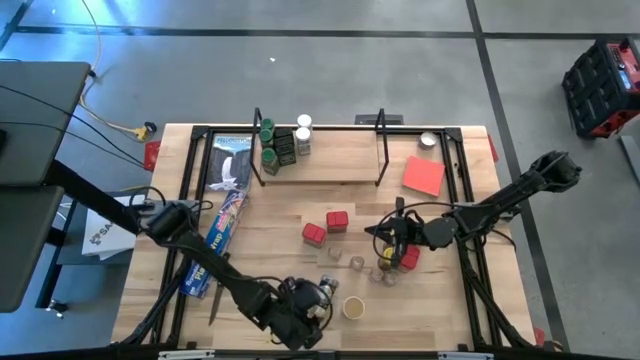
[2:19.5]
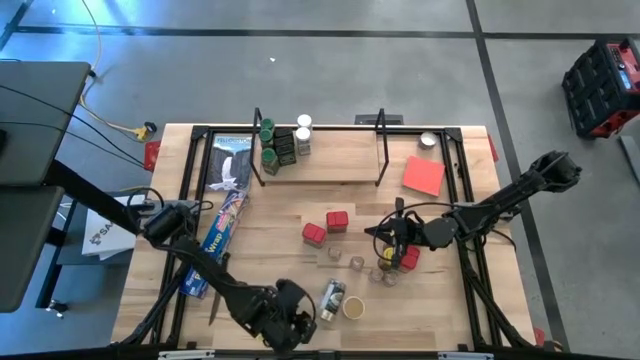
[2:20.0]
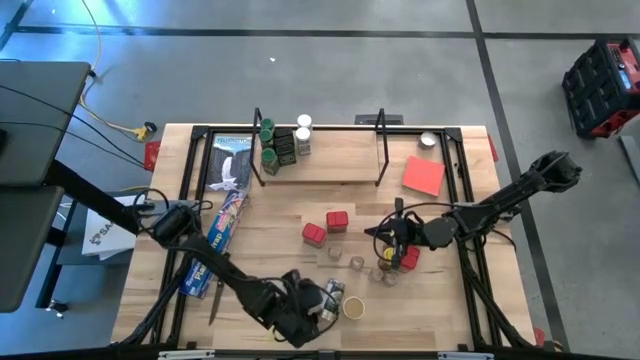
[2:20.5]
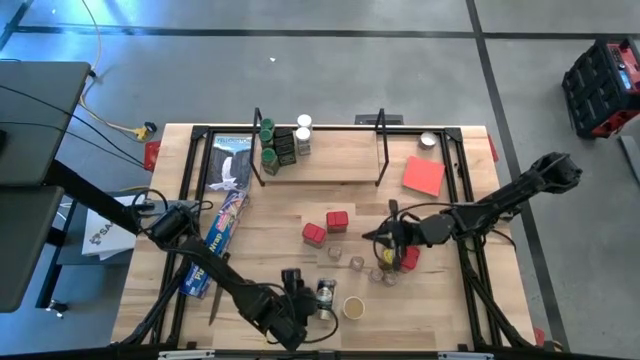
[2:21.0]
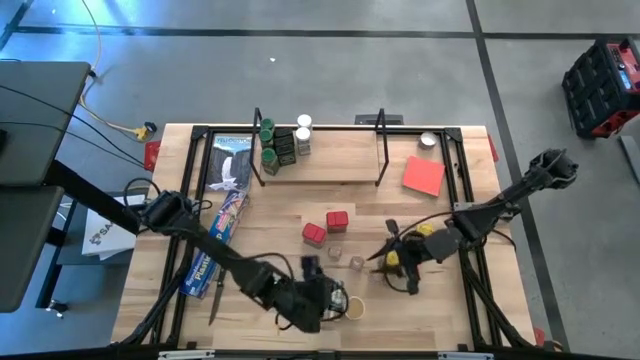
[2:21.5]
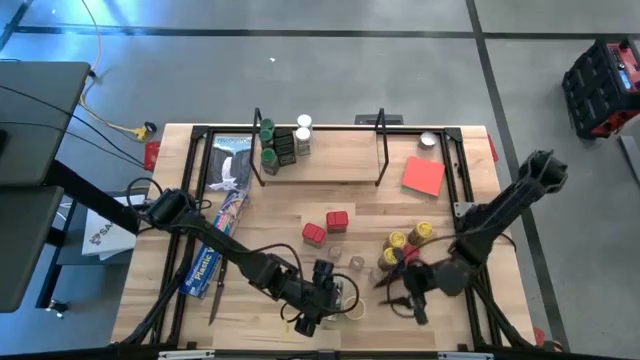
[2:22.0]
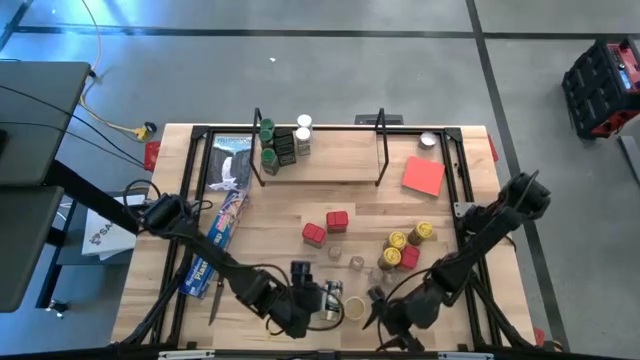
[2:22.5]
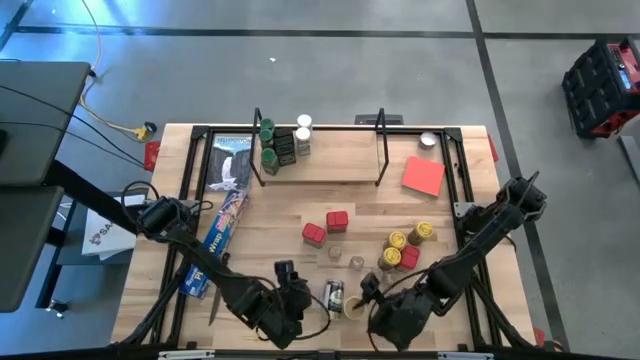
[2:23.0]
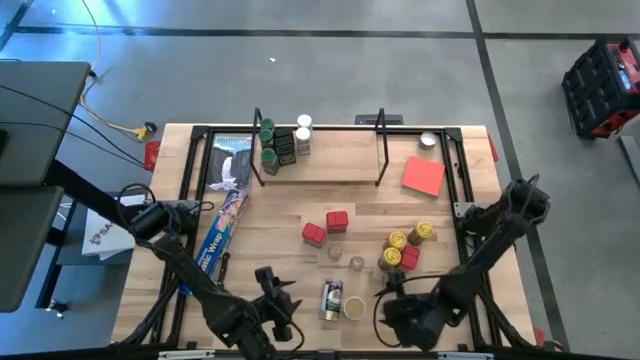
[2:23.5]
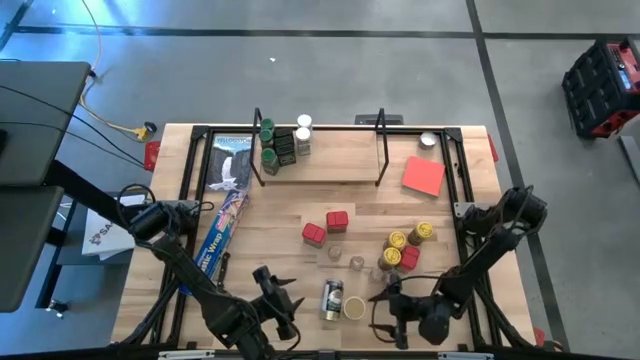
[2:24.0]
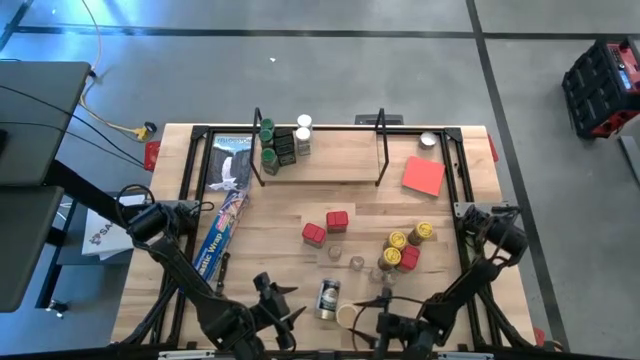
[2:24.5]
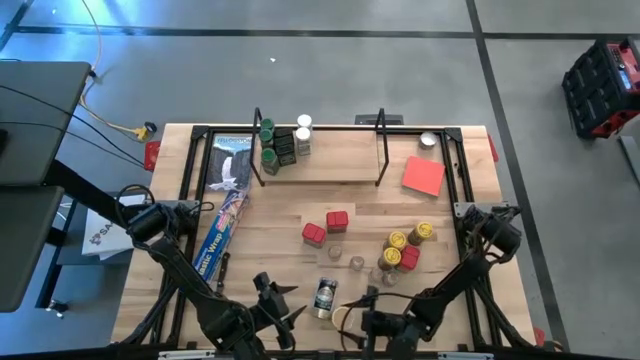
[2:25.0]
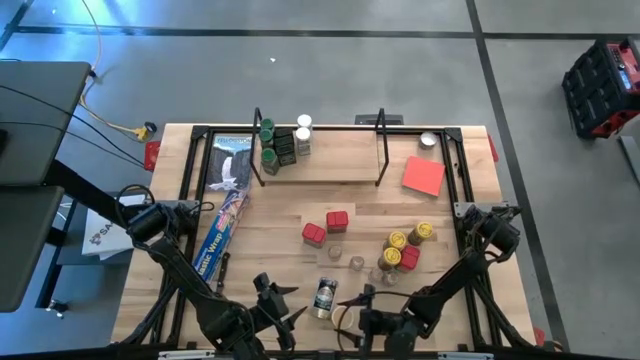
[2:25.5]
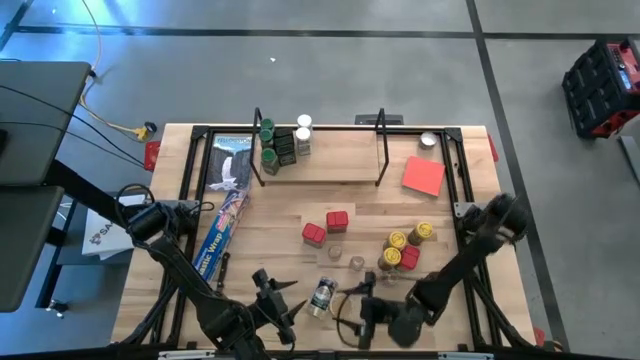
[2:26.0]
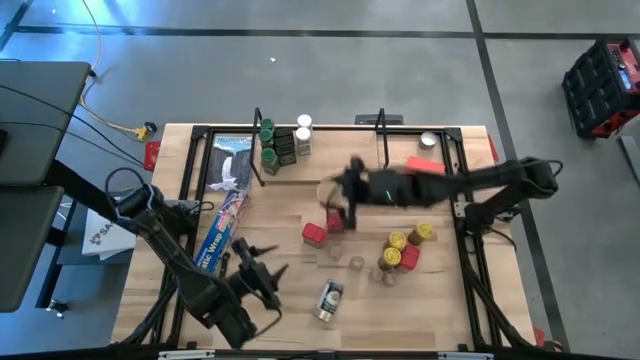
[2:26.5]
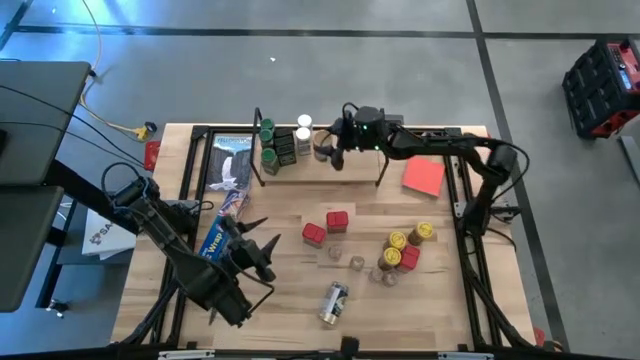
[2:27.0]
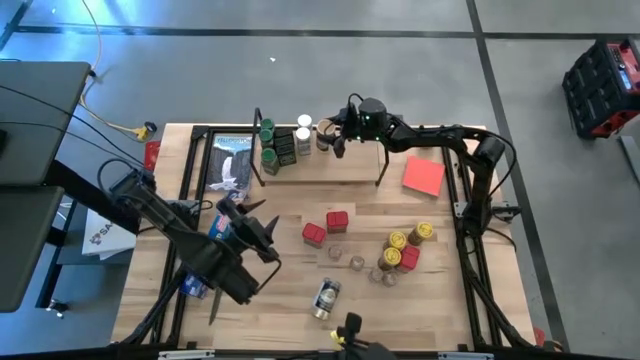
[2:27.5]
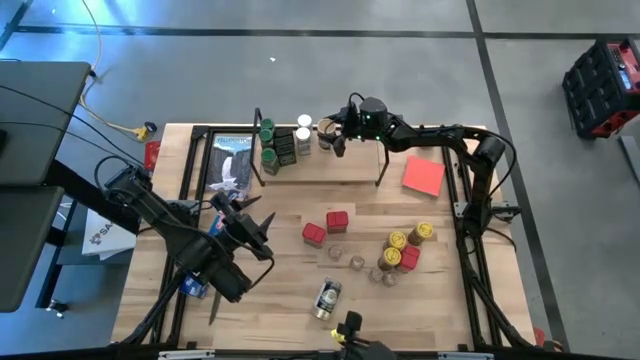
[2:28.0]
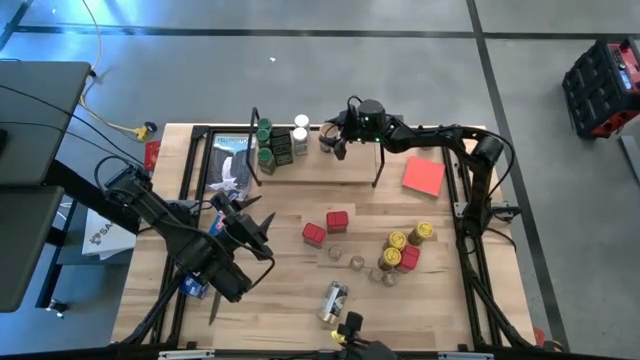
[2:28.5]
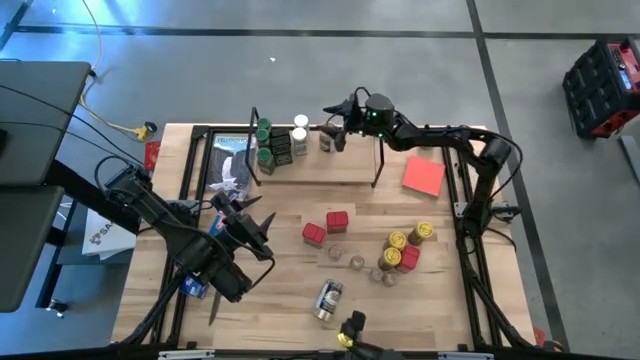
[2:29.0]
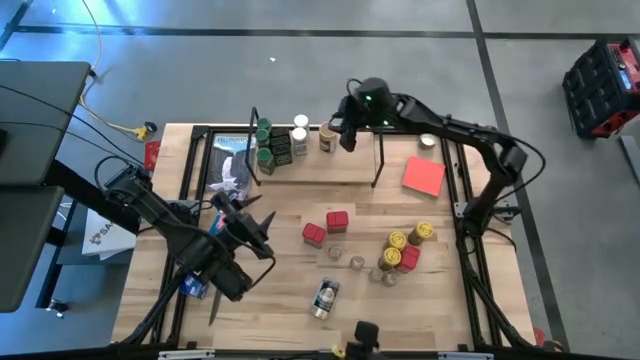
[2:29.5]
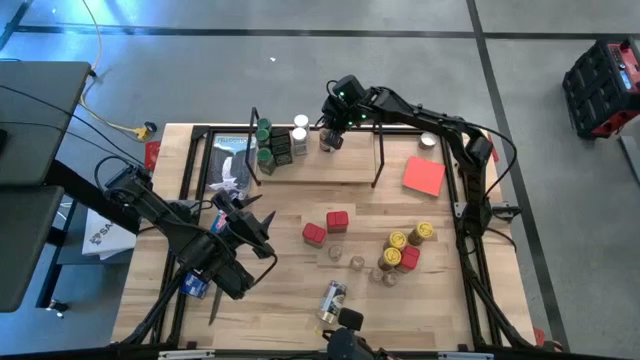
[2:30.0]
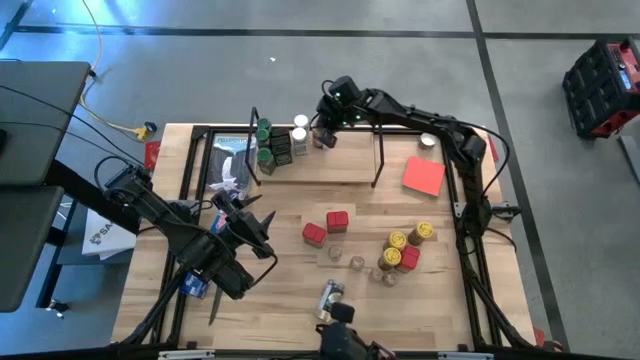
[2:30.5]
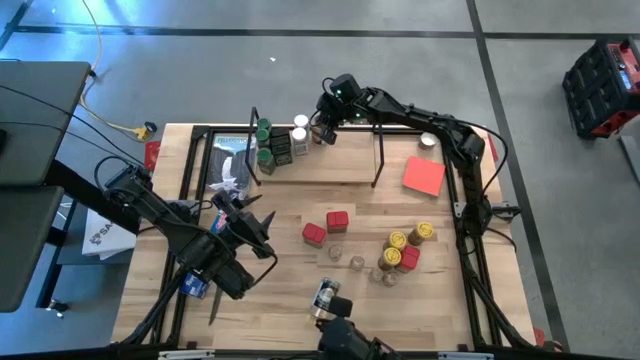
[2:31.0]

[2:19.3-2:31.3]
Task: Shelf spices
Put the gold seasoning bottle on the shelf to the top right of the white seasoning bottle

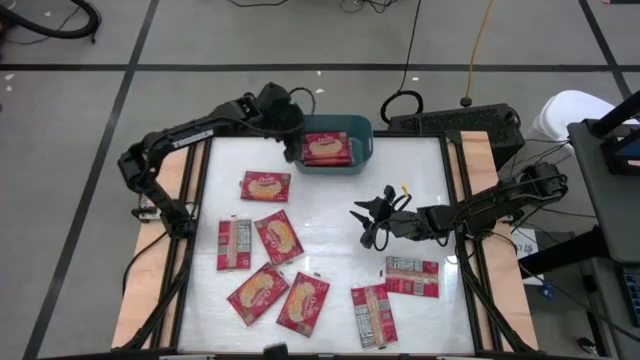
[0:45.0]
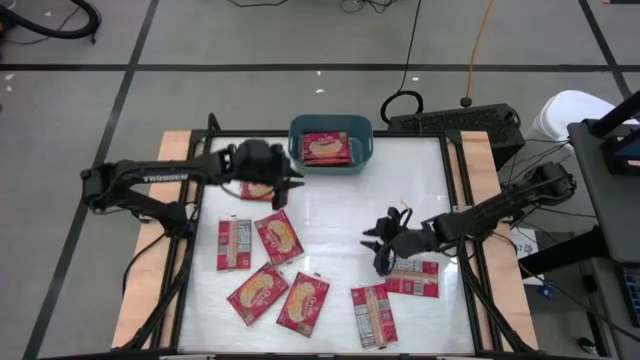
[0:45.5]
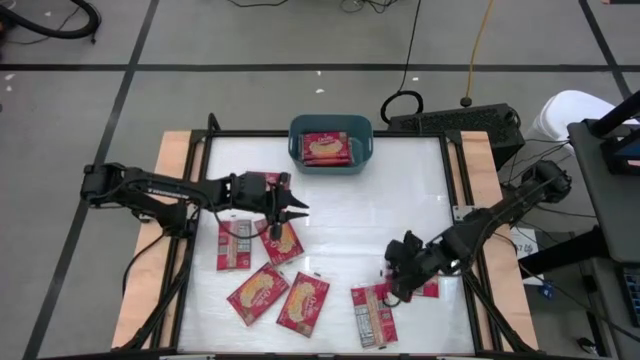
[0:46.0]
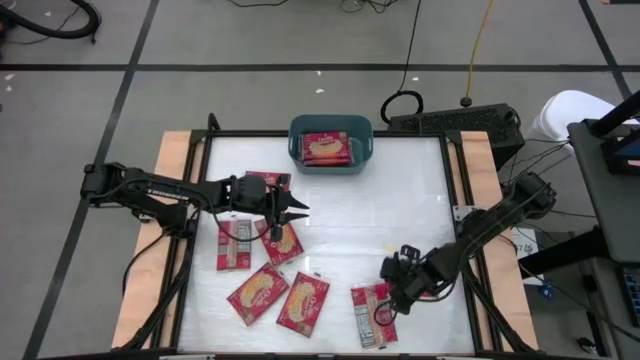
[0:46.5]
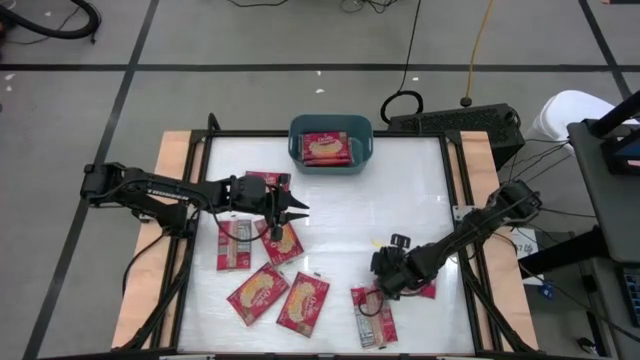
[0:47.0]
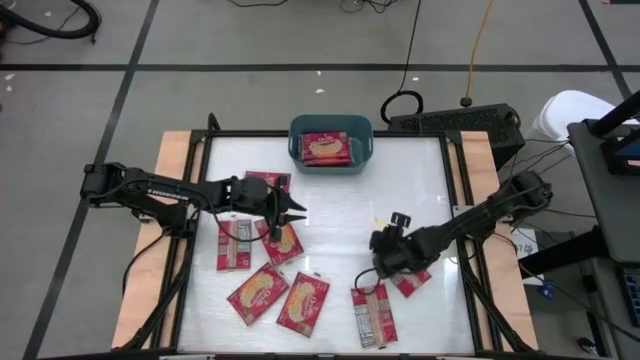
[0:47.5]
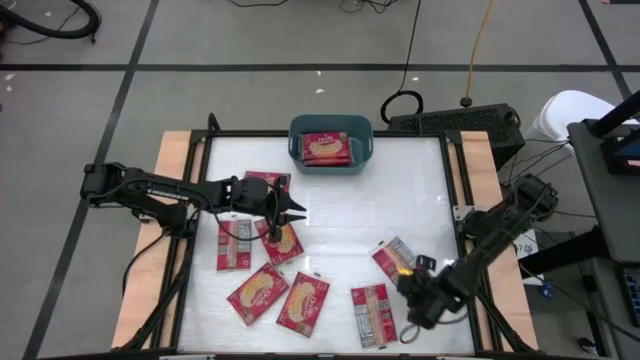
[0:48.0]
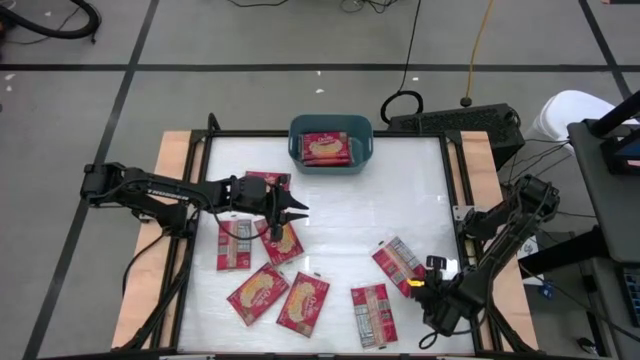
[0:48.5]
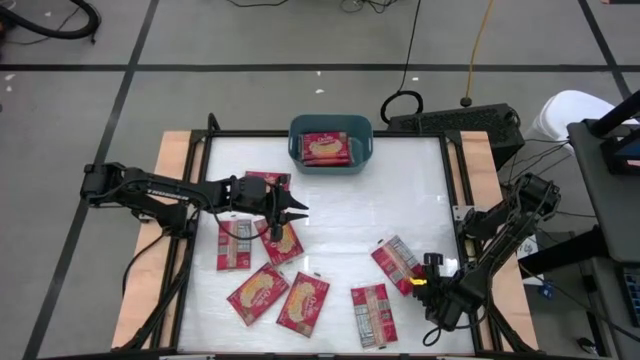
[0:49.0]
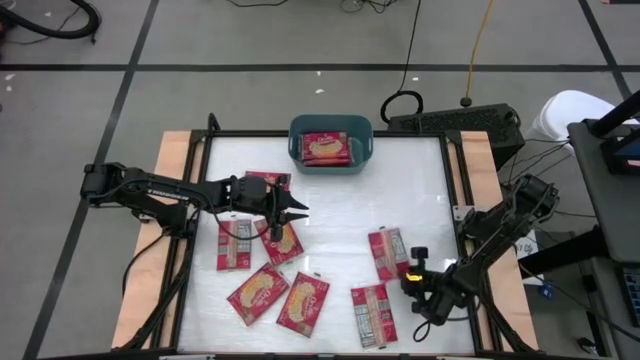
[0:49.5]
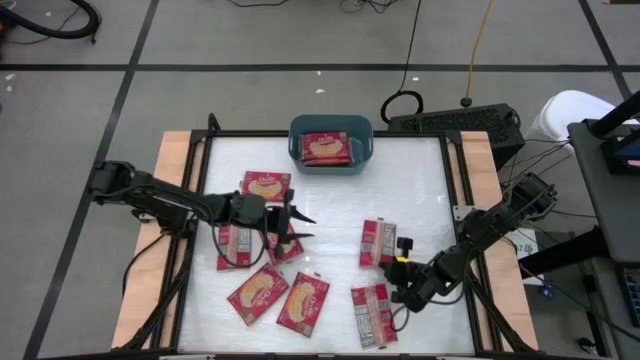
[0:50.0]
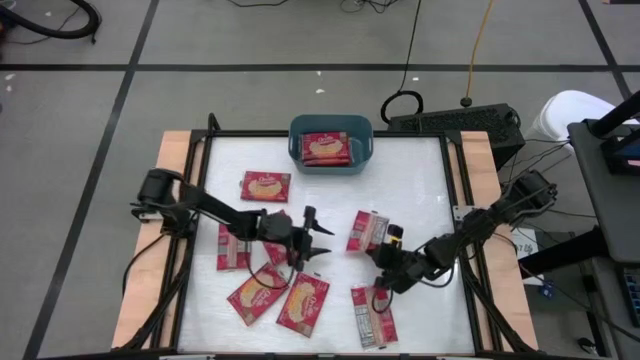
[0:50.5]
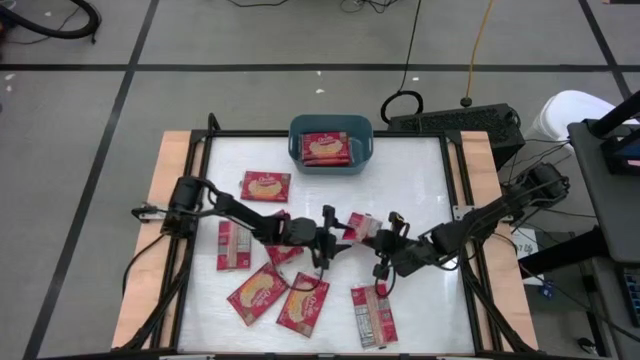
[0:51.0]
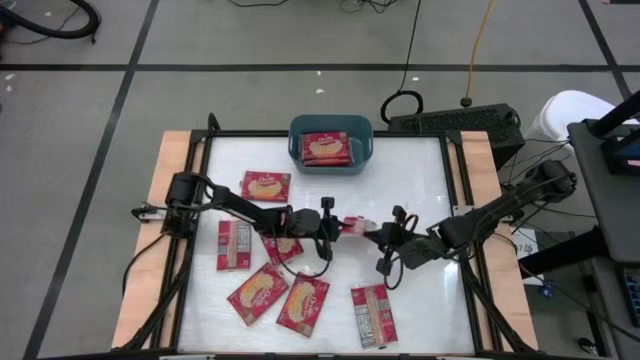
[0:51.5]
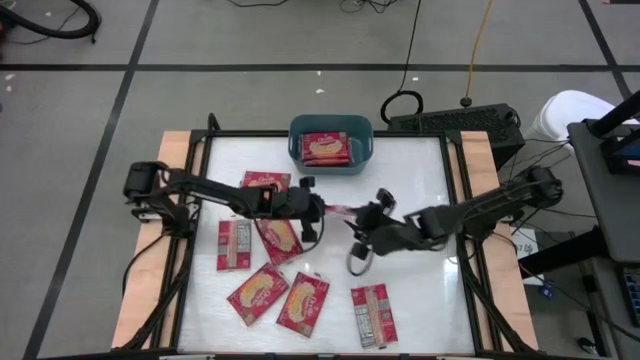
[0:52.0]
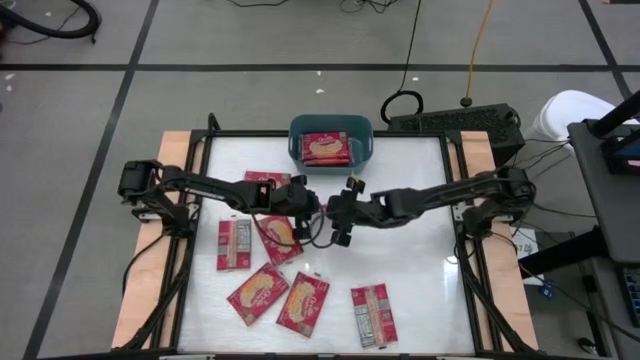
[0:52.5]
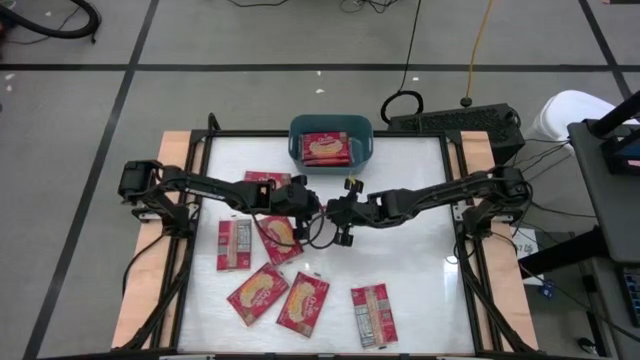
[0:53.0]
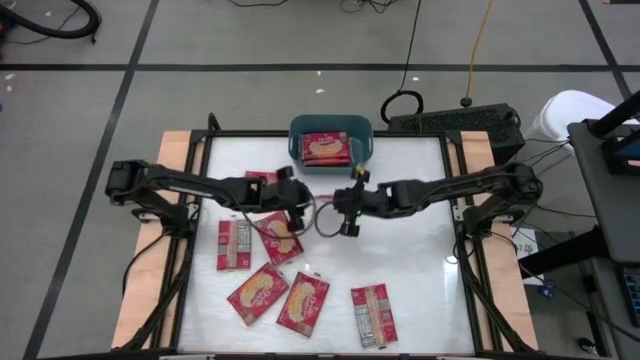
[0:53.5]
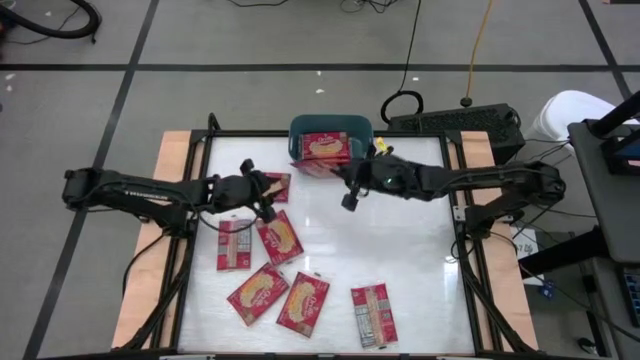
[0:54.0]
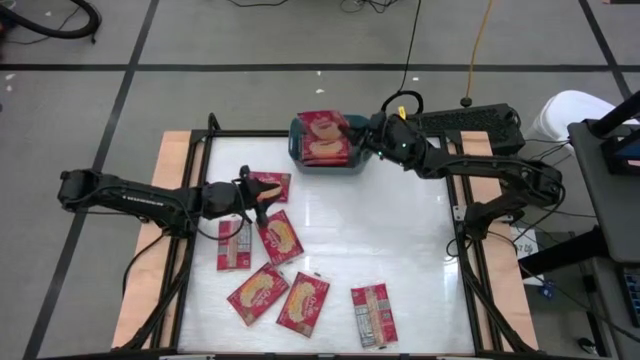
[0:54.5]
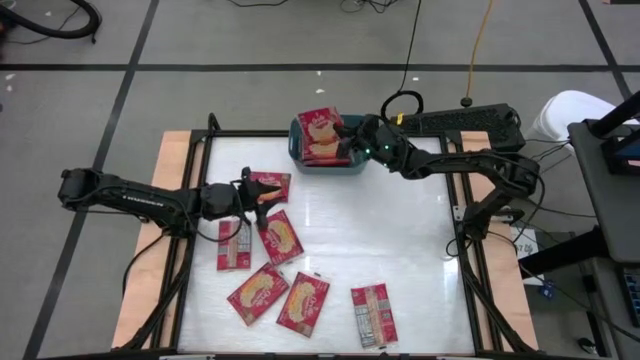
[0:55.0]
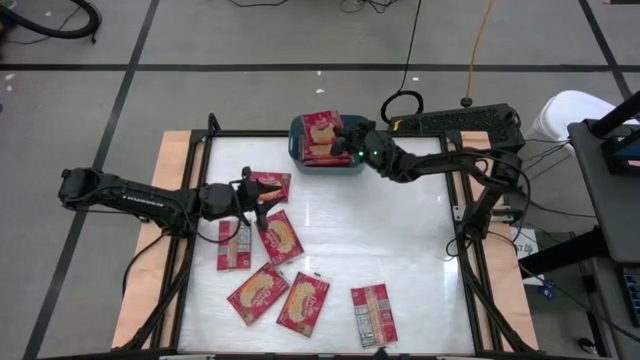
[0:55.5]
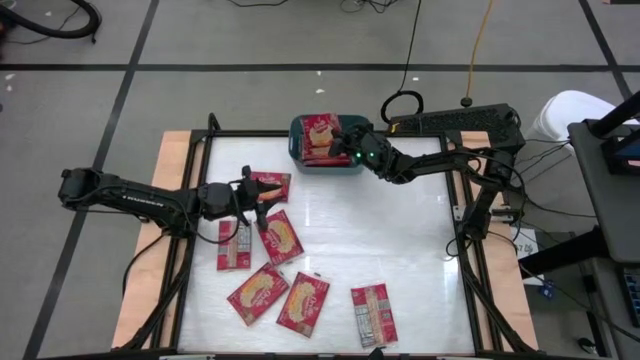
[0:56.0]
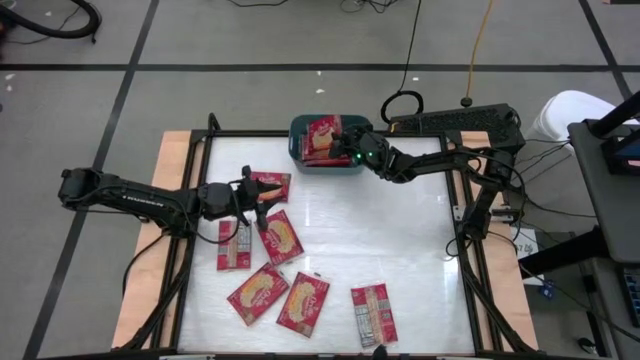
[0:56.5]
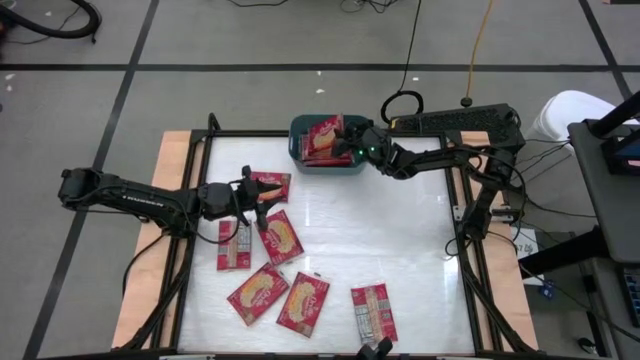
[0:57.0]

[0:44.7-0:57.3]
Task: Sort popcorn bags into baskets
Put the red popcorn bag into the green bin
